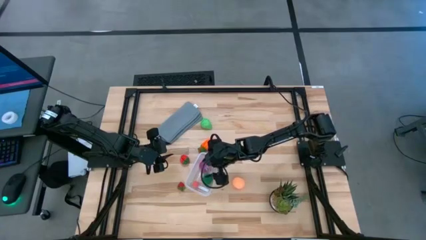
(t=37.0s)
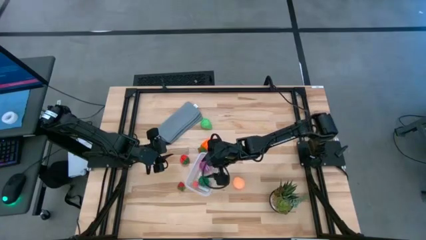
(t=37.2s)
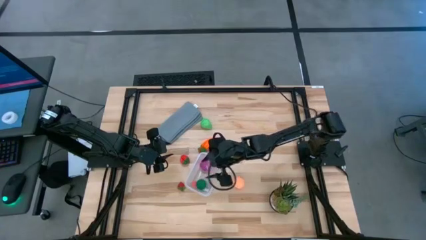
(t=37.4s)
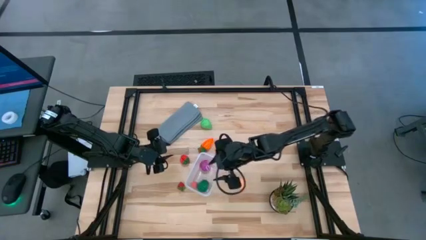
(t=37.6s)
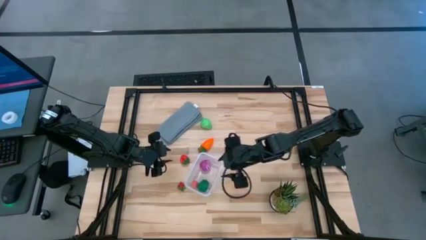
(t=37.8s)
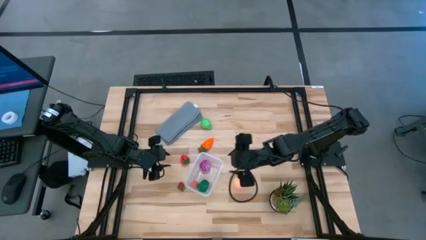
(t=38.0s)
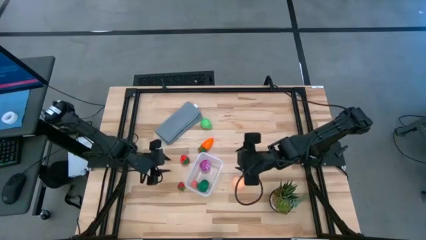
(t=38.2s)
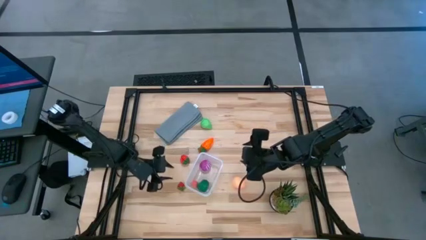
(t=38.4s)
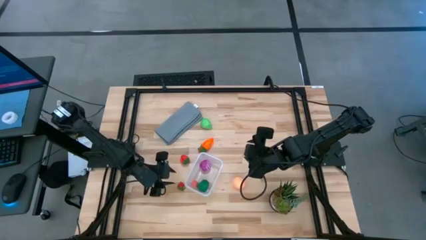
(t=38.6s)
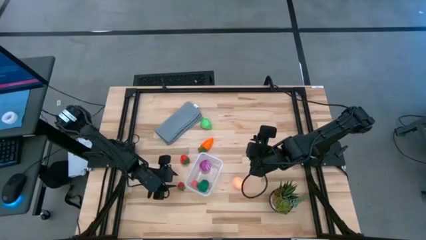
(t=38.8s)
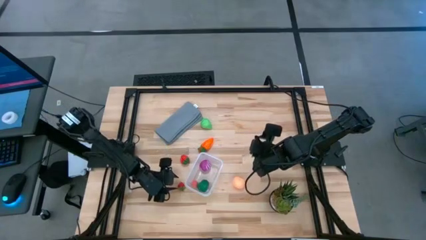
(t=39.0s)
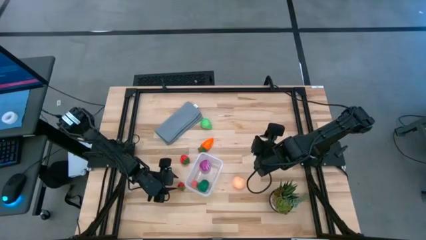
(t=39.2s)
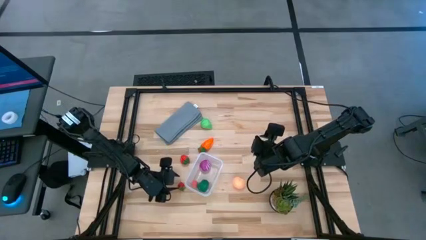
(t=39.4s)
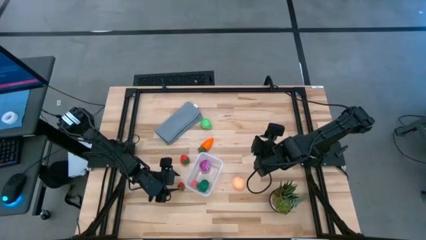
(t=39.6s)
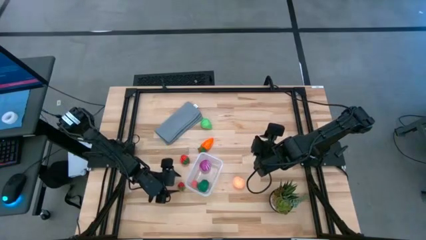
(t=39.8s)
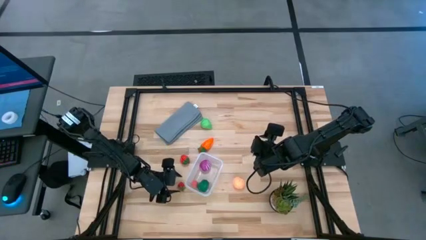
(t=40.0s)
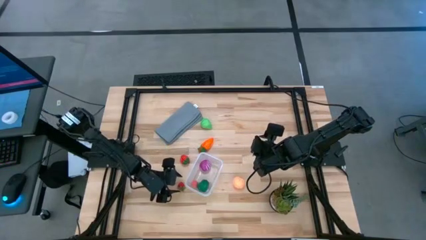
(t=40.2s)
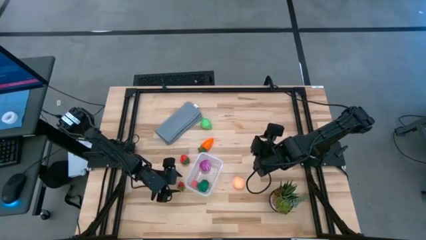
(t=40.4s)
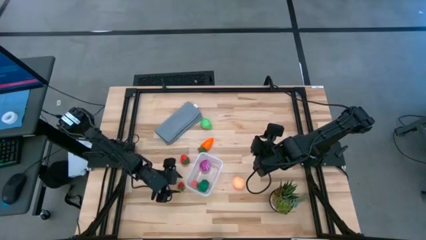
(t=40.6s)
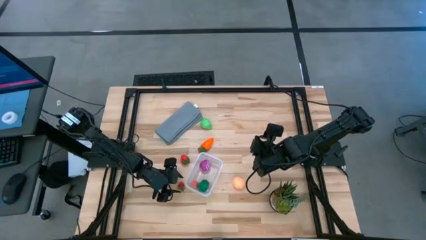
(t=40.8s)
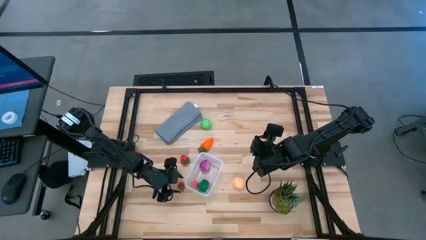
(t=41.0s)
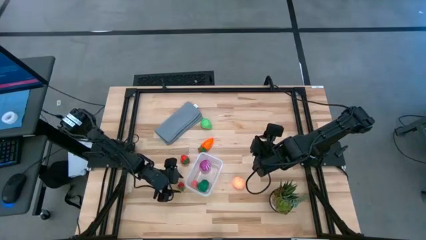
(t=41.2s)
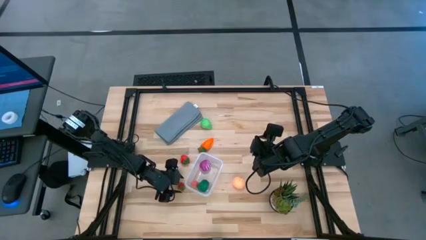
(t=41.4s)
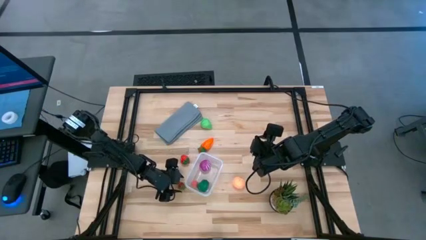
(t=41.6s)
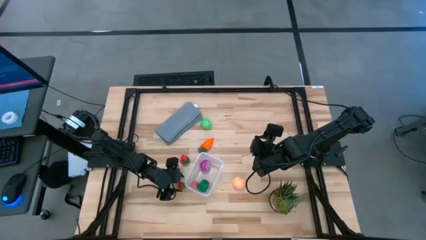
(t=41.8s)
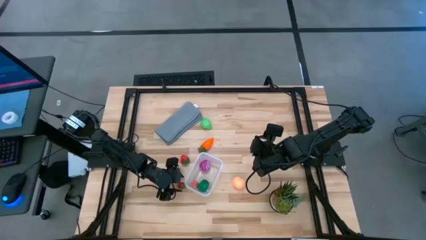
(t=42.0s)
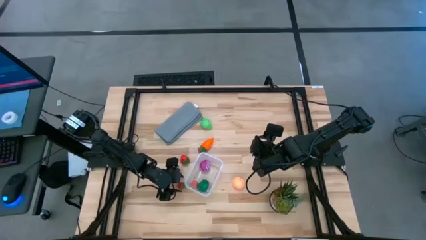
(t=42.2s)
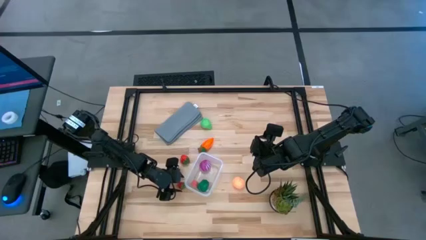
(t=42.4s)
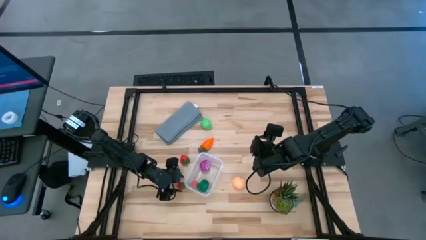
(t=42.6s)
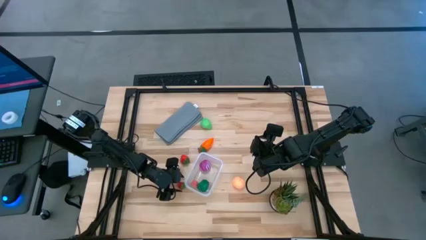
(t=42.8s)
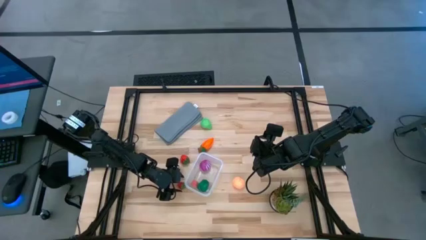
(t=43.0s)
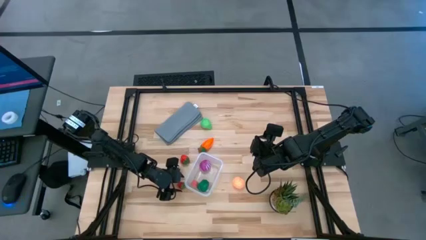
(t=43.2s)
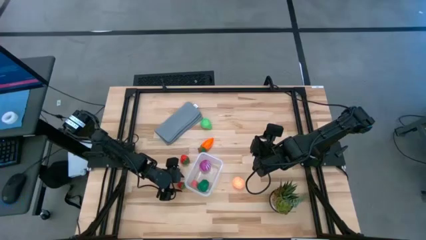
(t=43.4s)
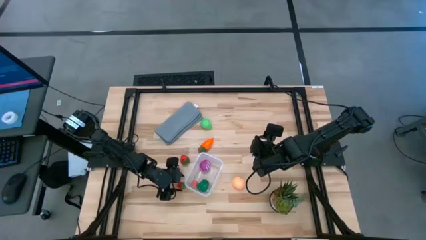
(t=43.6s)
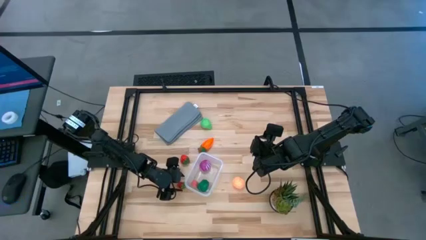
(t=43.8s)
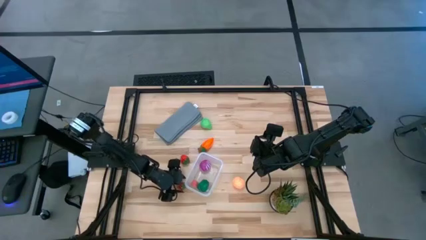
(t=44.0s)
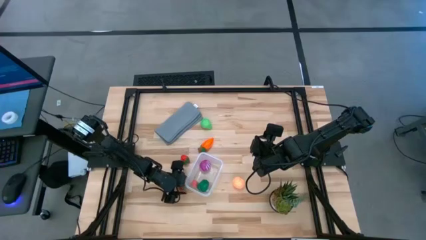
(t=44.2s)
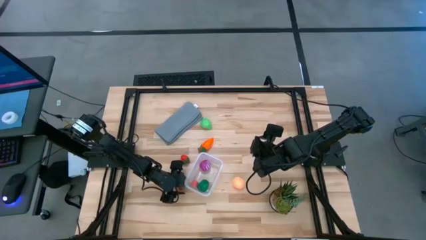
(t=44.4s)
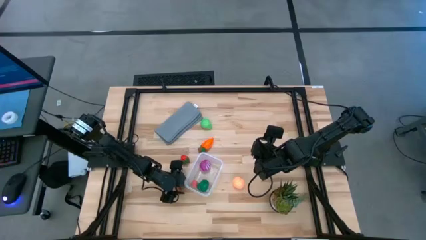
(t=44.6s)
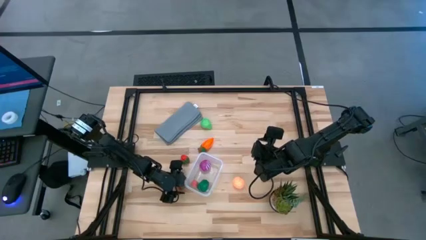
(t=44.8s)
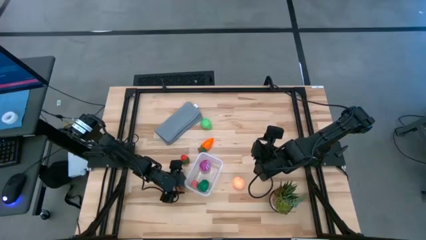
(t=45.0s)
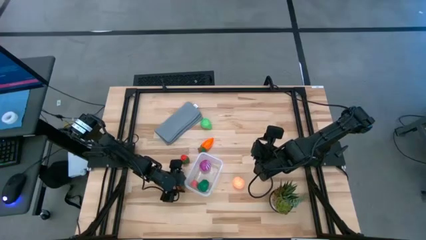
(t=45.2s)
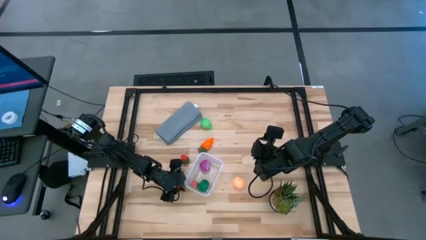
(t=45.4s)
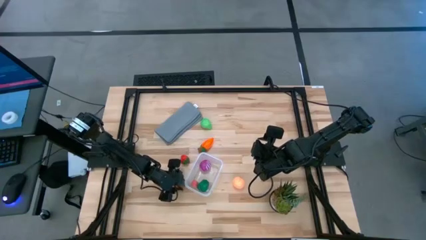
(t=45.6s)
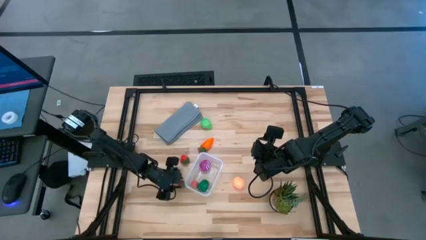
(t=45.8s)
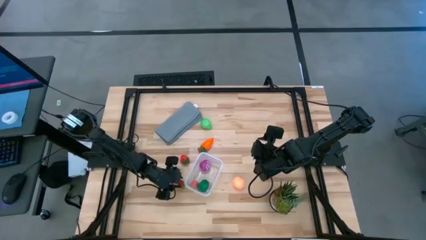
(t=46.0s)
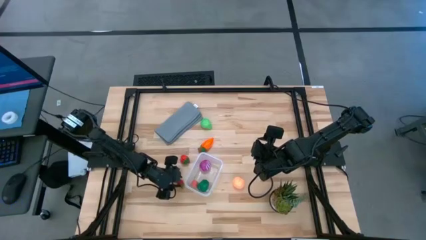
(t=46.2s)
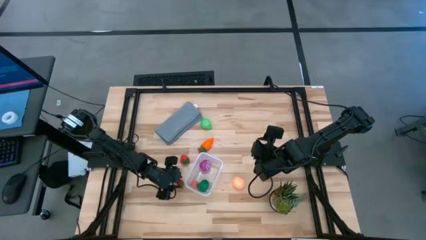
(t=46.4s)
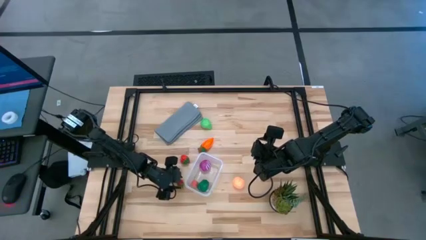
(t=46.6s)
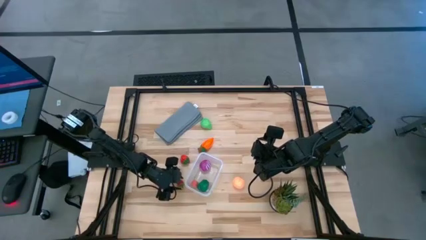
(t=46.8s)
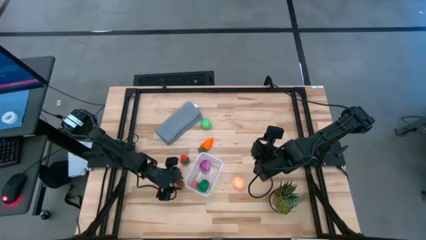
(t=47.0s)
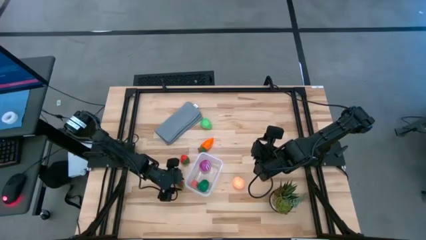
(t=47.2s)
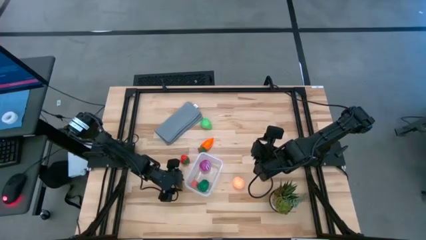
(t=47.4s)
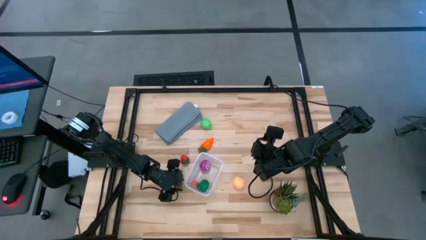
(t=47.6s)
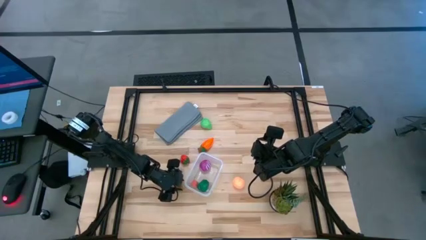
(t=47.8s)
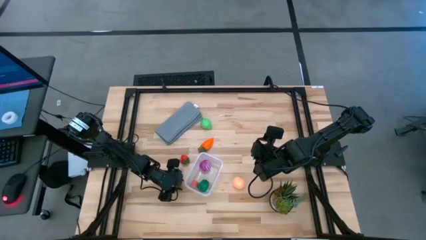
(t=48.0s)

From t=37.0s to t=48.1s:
Task: Pick and placing Produce into tupperware
Put the bottom red strawberry into the transparent bin

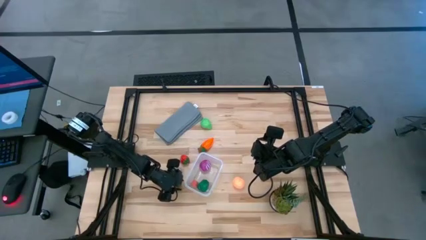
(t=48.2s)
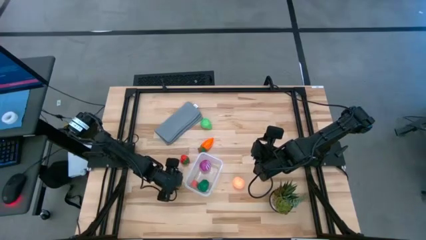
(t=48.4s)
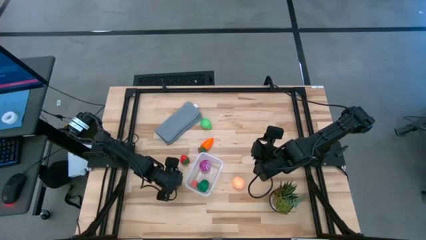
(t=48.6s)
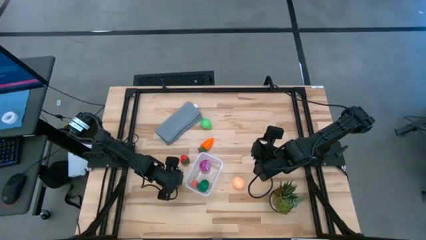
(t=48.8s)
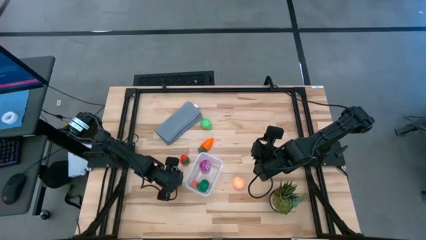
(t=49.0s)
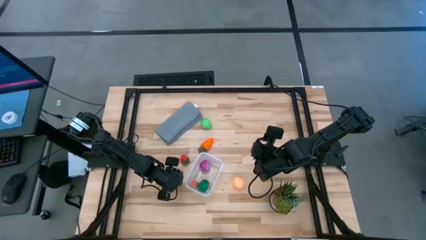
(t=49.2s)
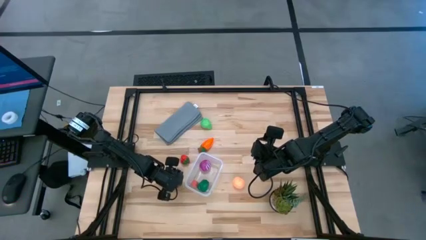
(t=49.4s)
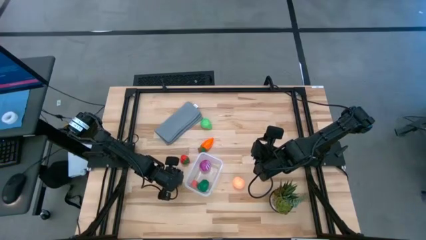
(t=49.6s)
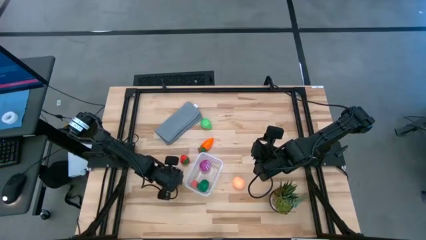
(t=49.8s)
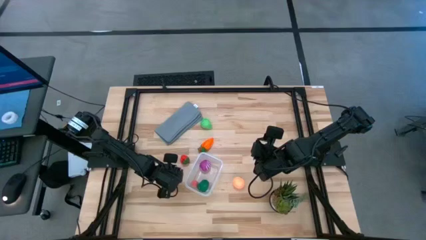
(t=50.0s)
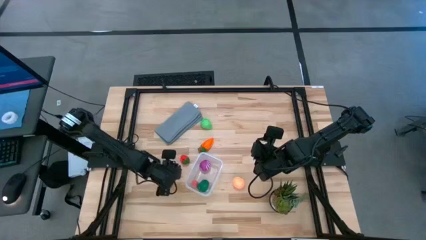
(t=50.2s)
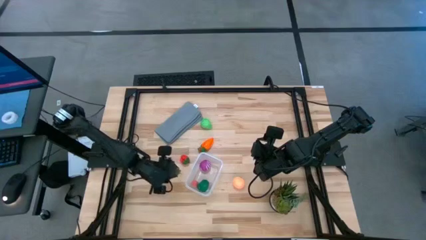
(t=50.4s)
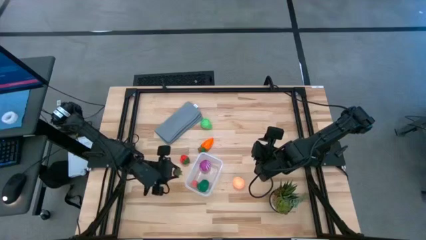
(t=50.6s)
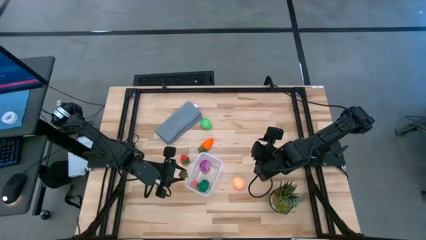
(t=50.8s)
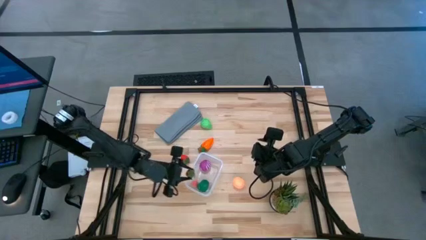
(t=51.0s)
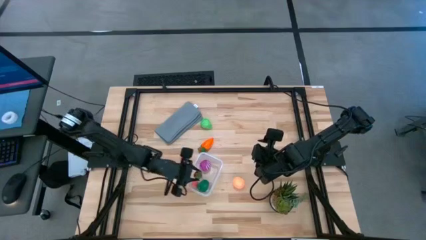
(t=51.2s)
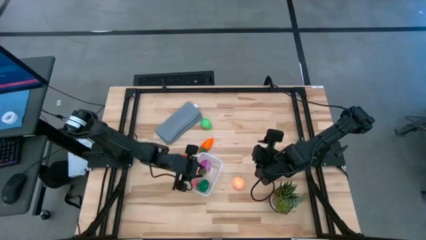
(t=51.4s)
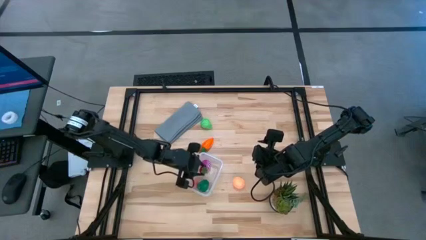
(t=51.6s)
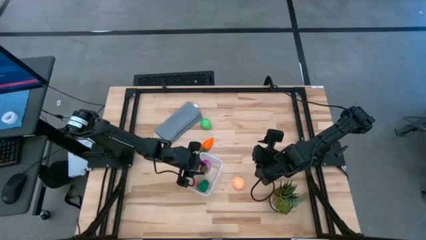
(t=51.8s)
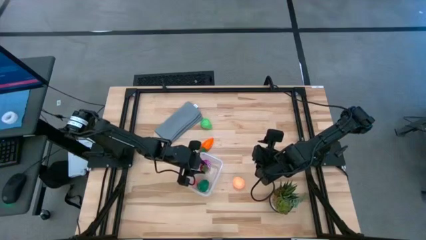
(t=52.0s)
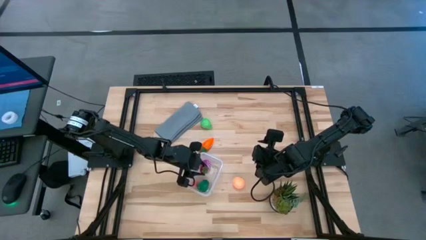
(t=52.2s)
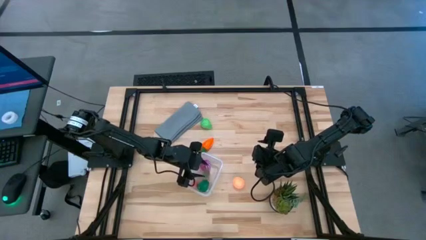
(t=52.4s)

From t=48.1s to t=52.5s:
Put the bottom red strawberry into the transparent bin

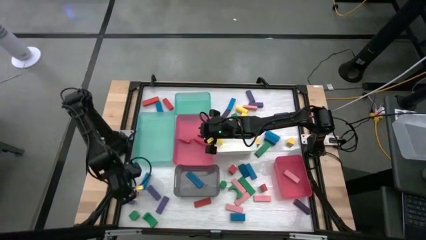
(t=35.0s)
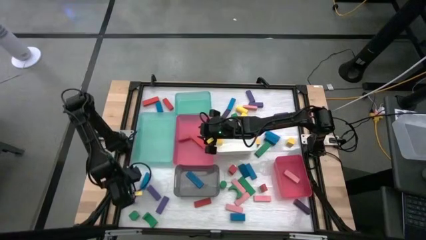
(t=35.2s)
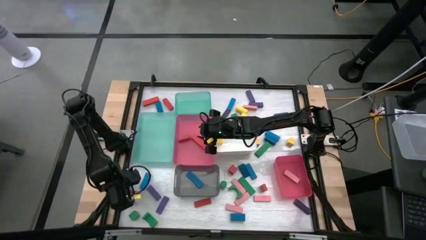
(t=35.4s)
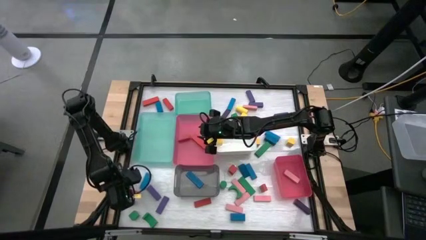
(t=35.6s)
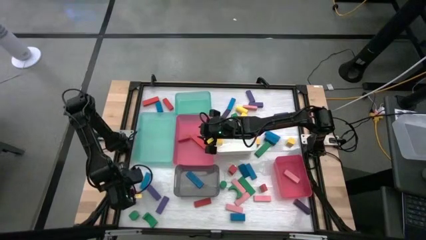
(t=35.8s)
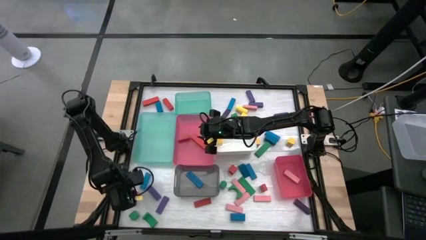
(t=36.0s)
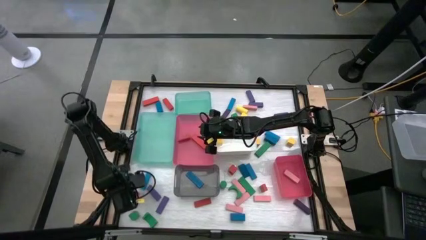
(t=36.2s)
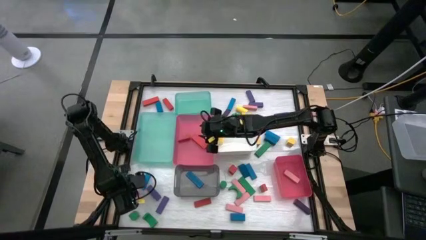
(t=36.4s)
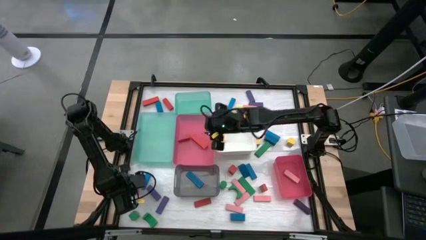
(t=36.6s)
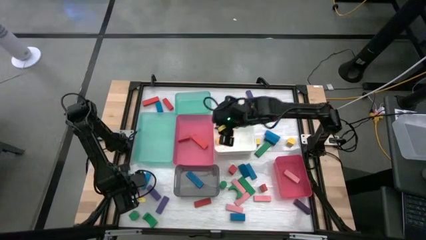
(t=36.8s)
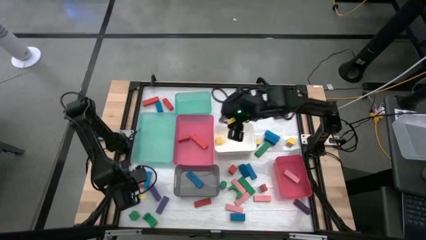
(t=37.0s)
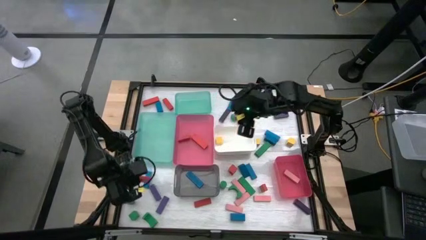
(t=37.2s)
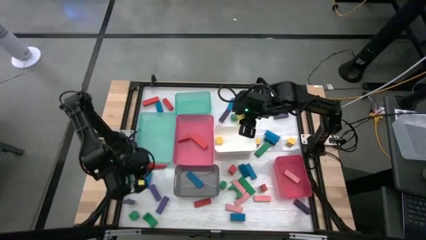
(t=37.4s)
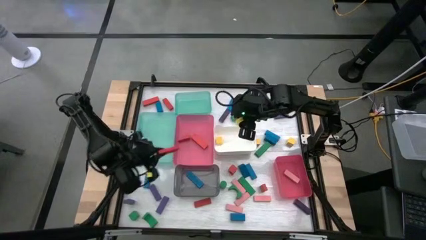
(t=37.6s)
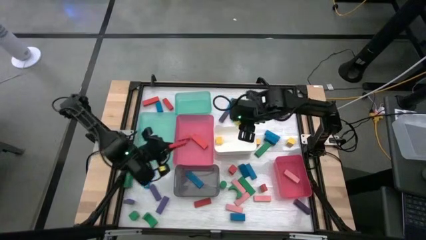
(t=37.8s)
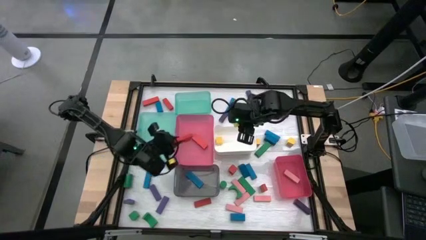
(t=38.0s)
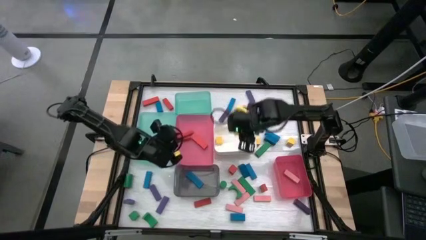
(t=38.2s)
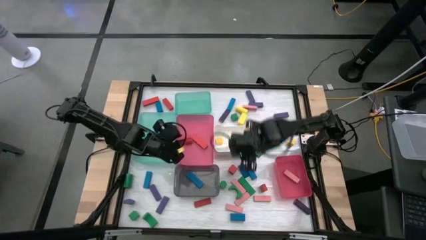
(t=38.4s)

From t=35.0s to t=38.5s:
Task: Sort blocks
Put the red block into the top pink bin
